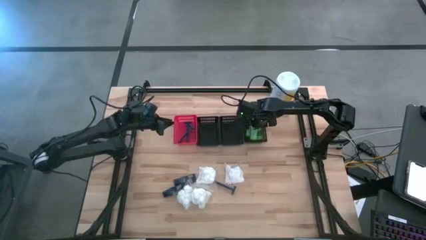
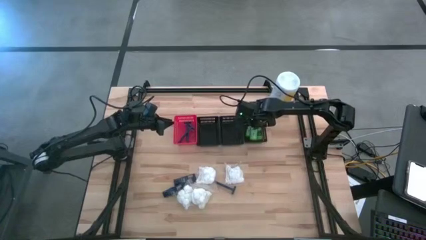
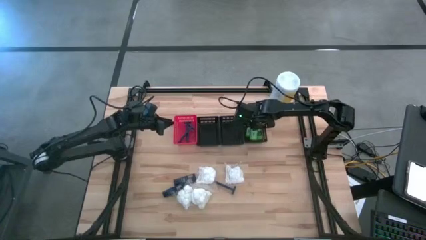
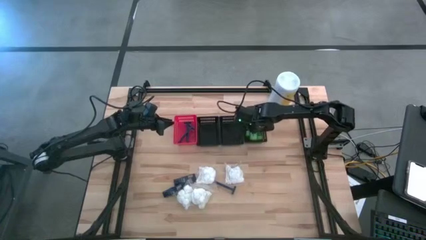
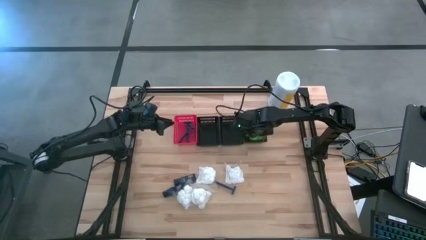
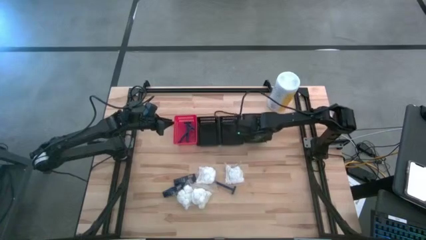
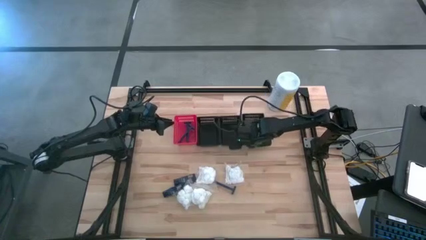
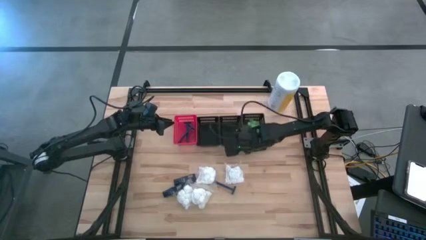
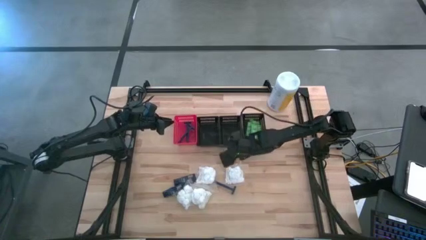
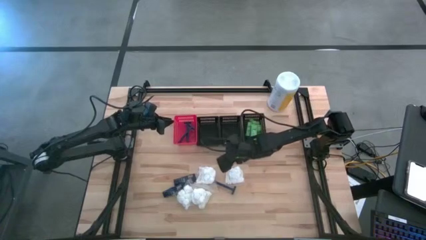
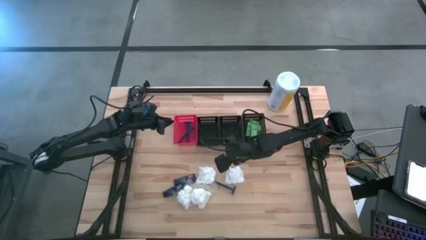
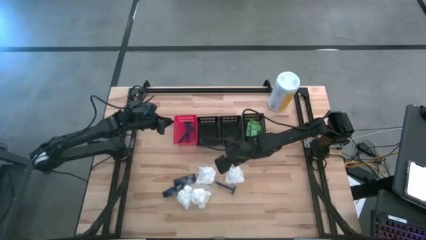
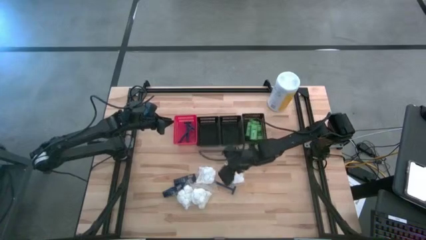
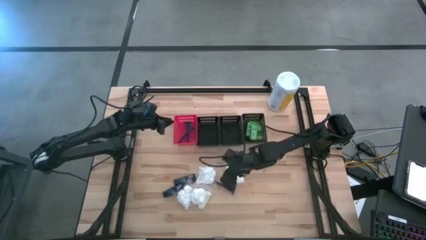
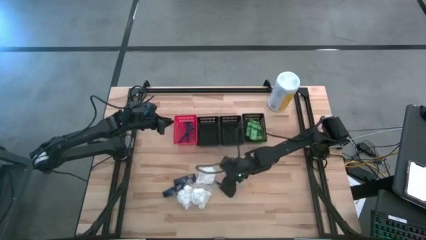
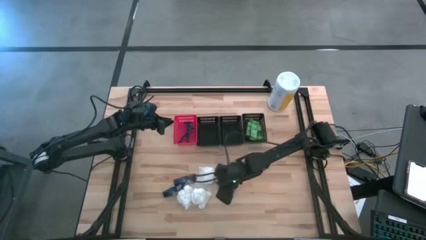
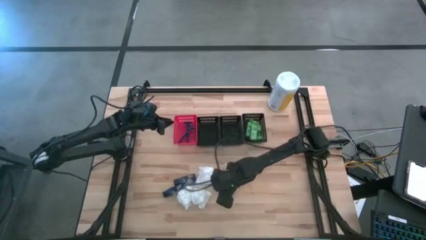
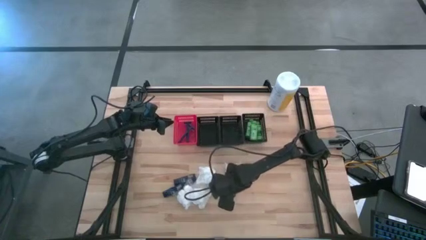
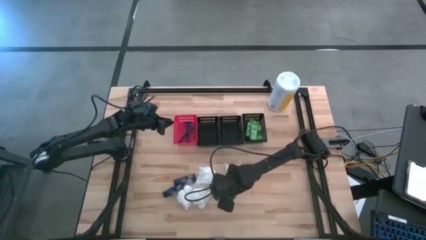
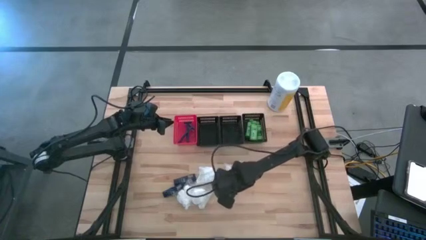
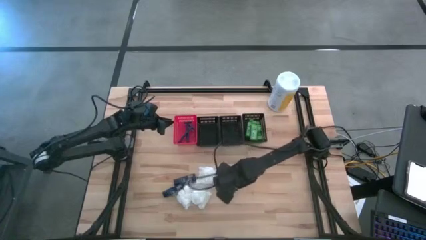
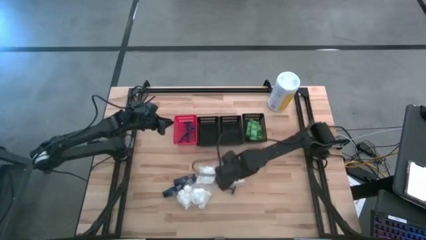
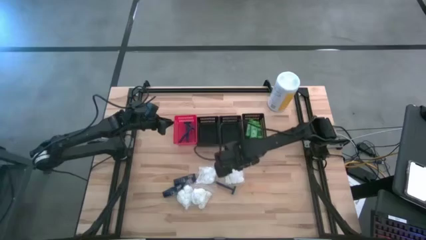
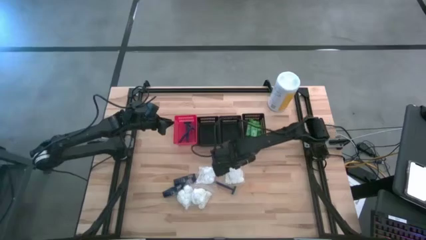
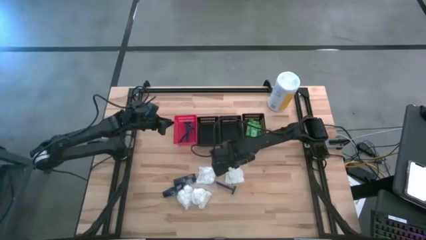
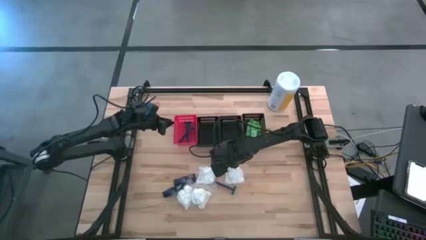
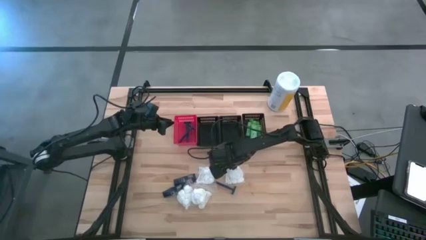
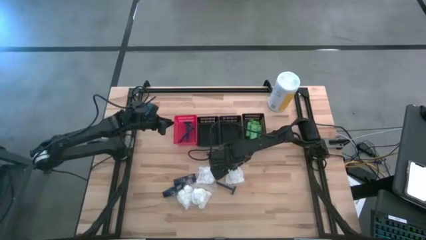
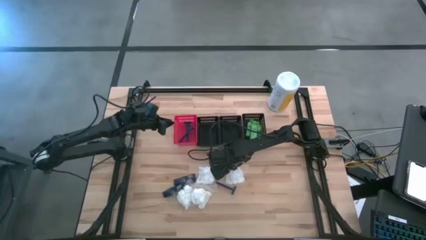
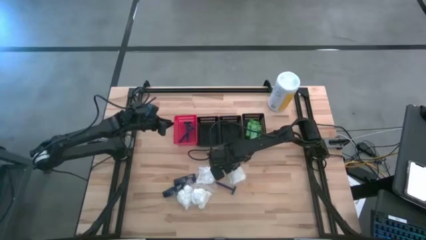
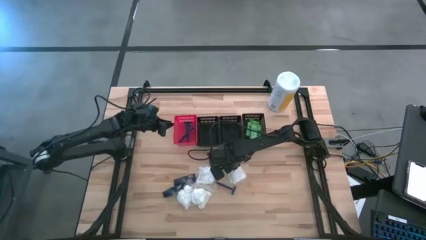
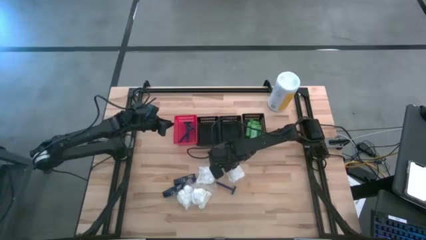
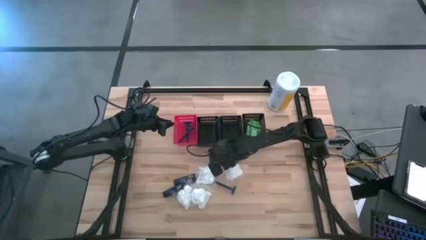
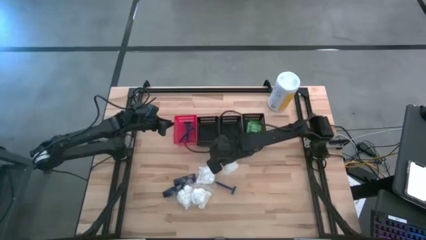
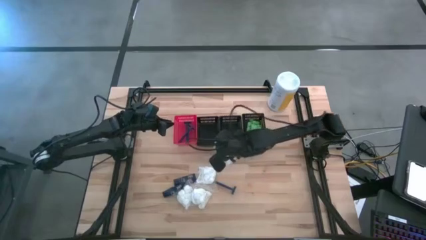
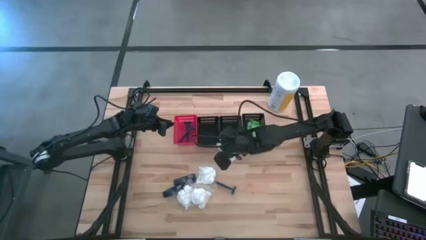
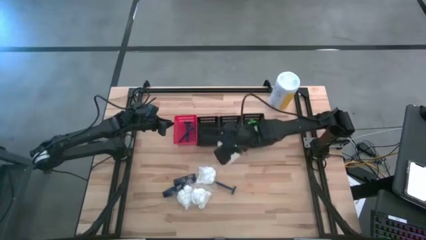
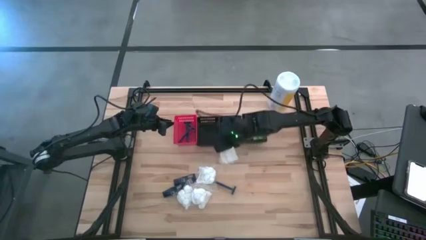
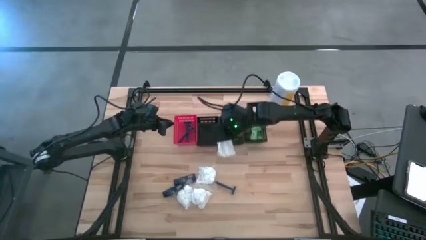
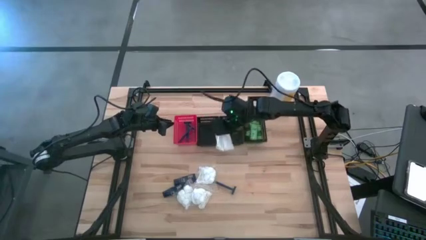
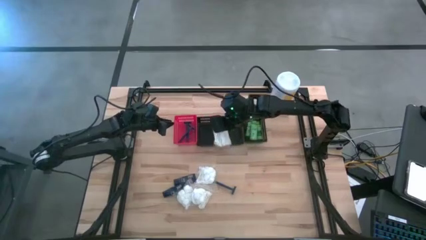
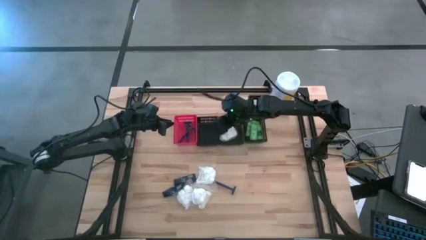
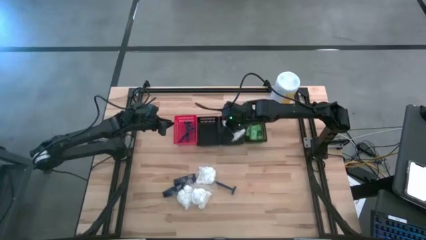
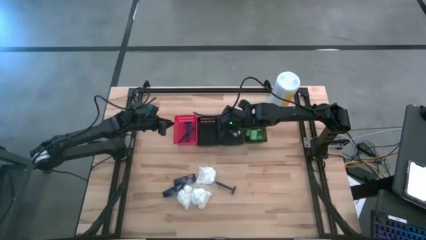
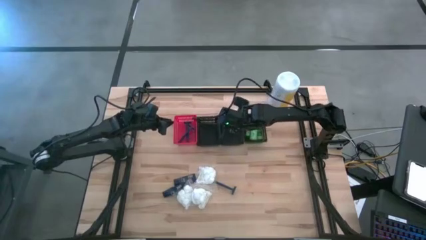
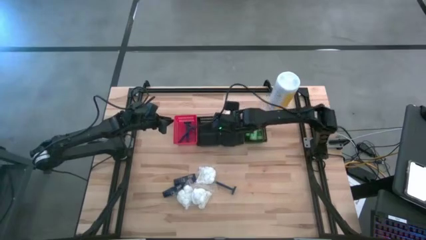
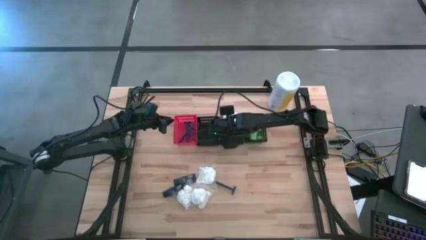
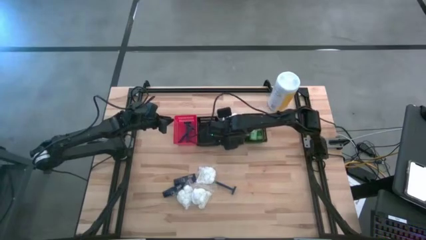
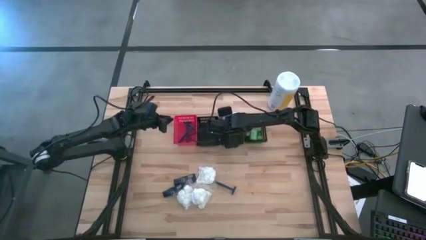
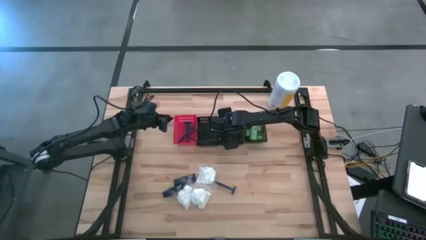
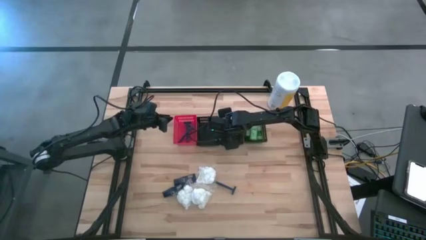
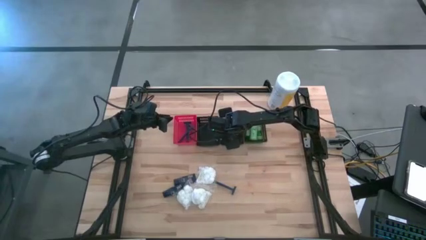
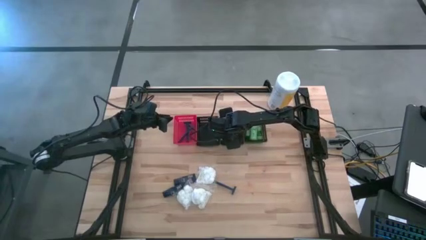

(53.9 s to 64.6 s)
Task: Pick & Place Travel size toiletries
Put the cotton pack into the middle black bin

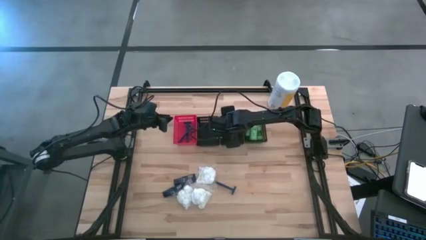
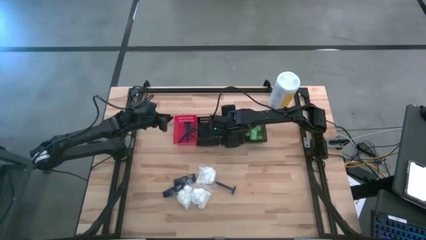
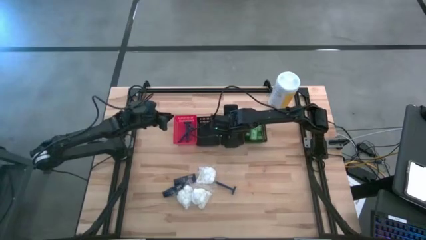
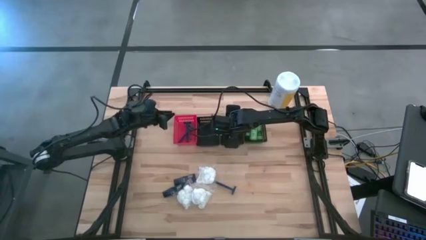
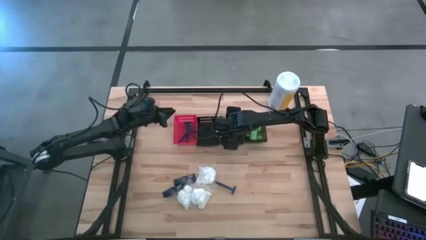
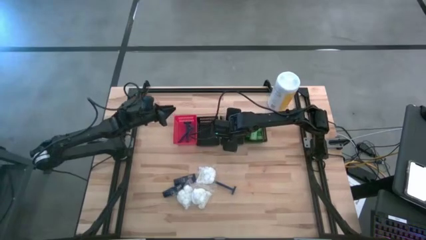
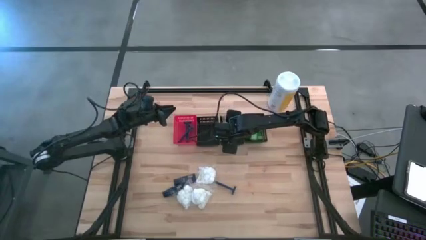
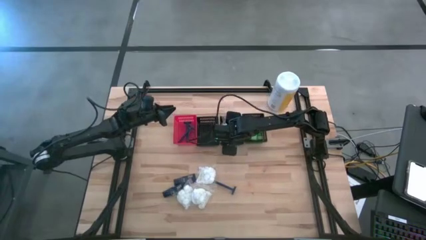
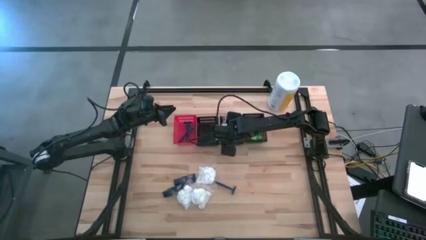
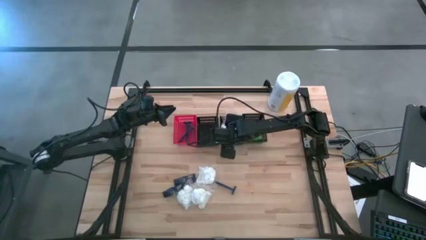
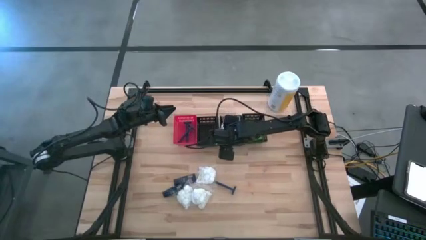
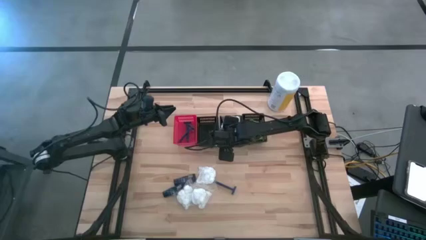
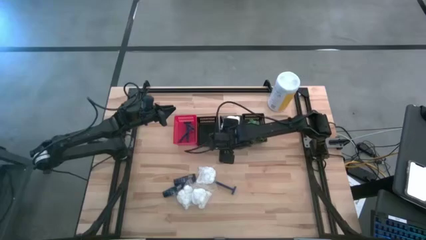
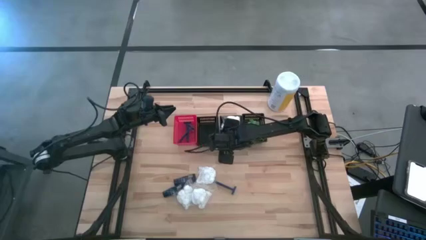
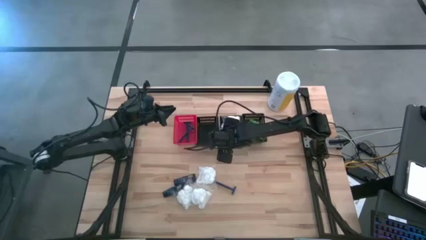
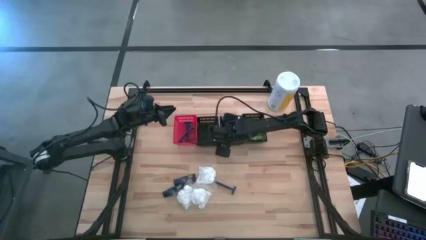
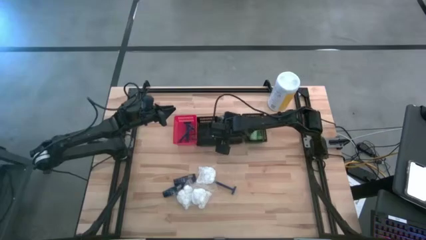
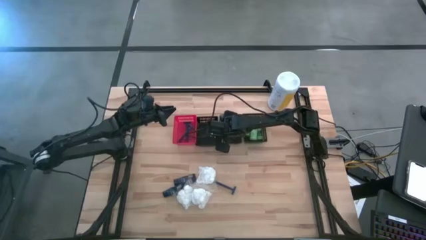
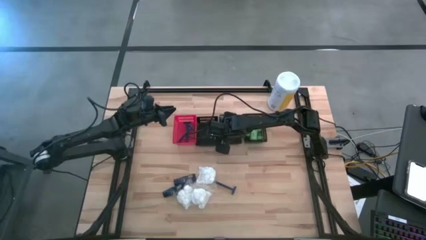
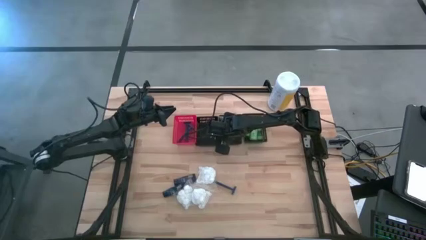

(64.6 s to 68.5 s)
Adjust the middle black bin

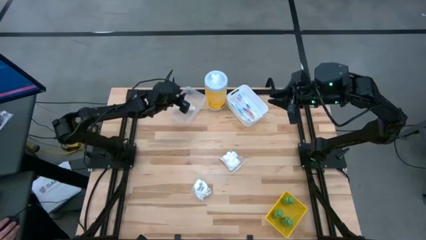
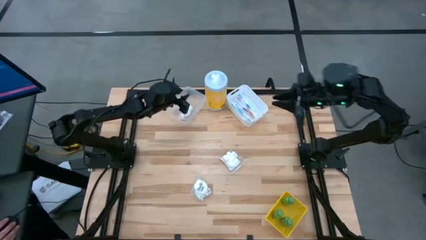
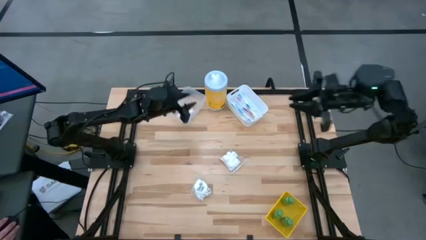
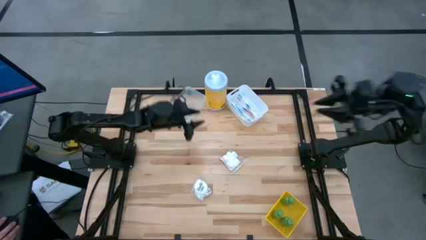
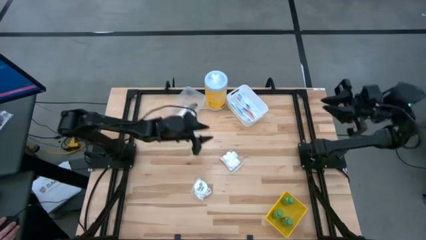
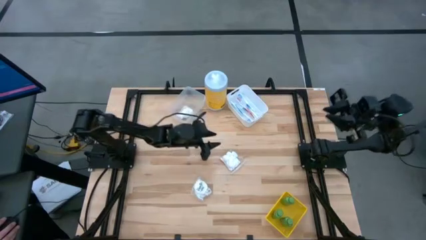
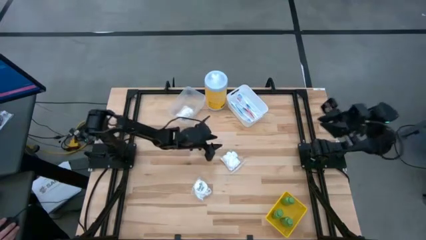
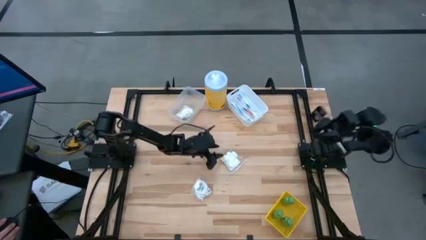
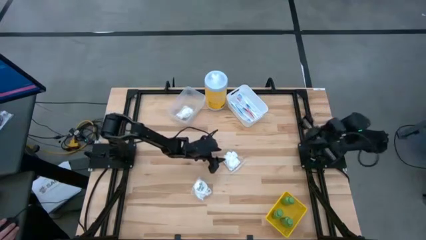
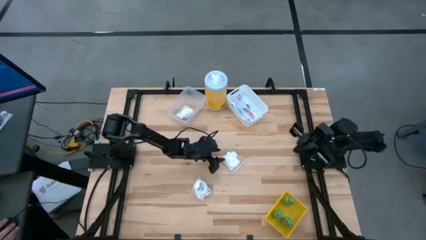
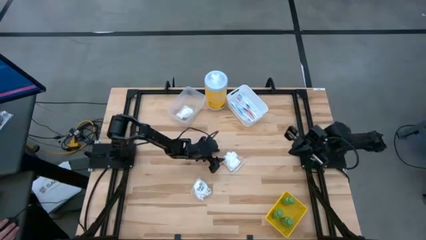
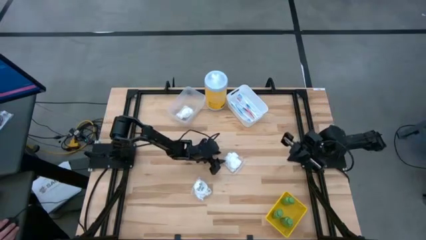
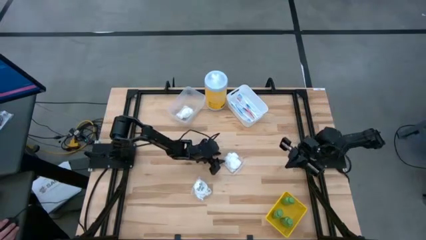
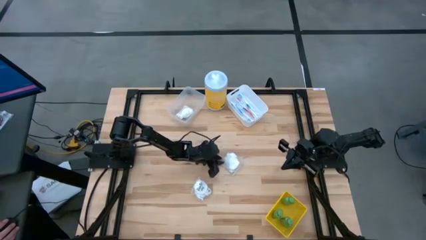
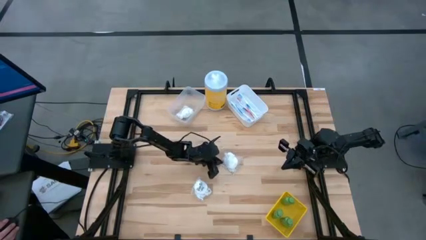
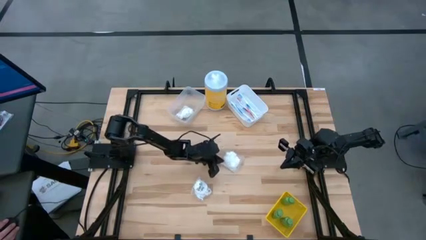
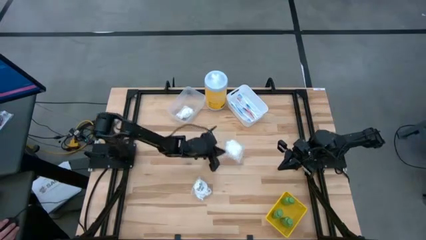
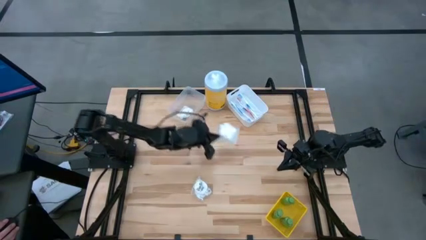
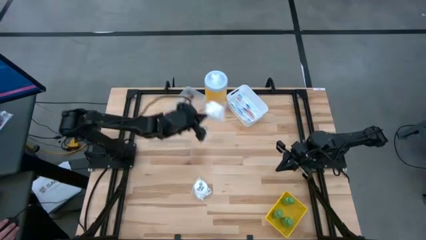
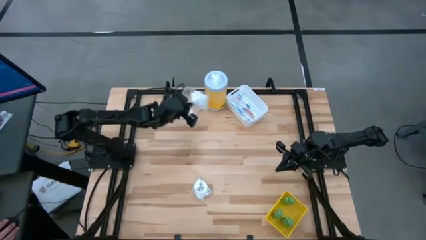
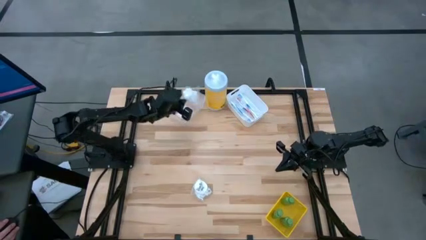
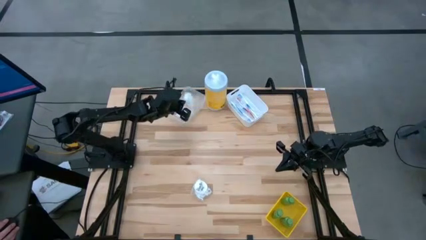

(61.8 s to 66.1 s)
Task: Pick & Place Travel size toiletries
Put the top cotton pack into the transparent bin
